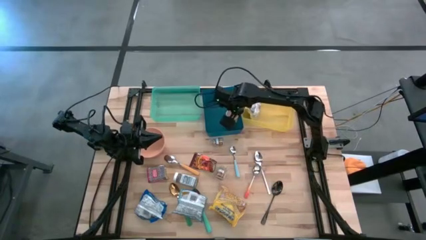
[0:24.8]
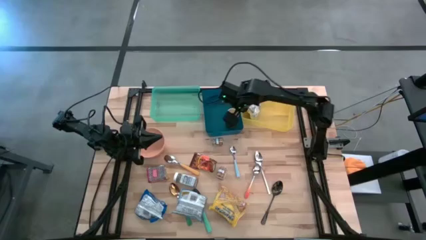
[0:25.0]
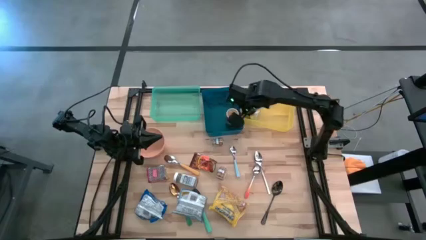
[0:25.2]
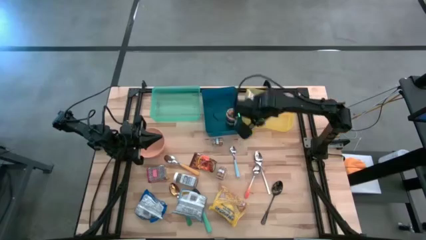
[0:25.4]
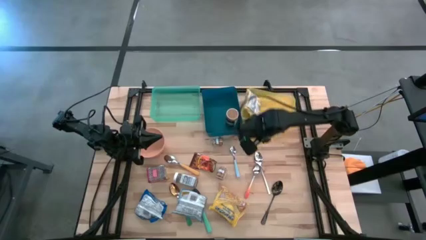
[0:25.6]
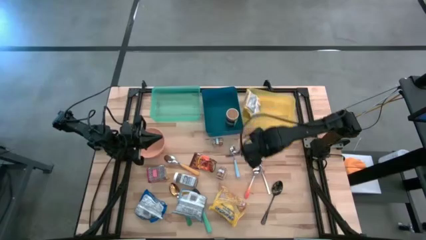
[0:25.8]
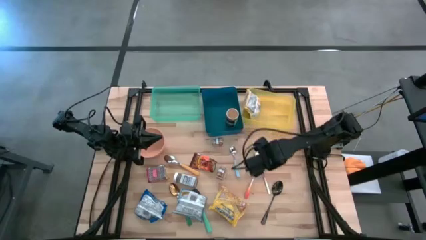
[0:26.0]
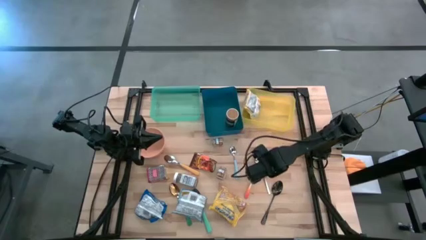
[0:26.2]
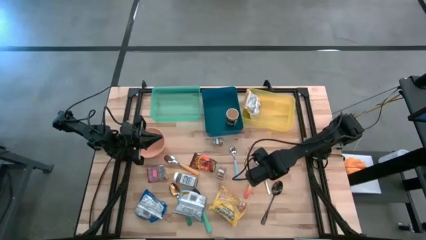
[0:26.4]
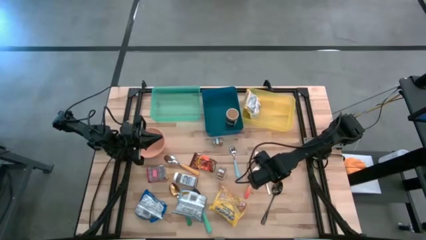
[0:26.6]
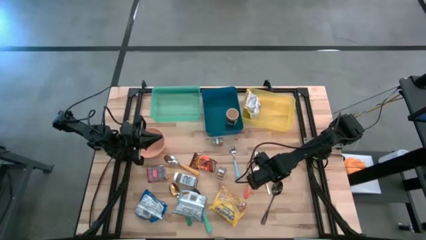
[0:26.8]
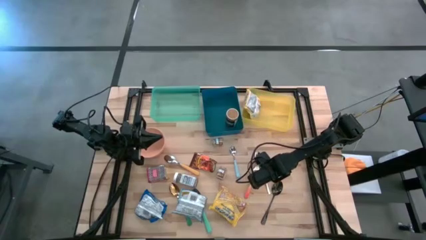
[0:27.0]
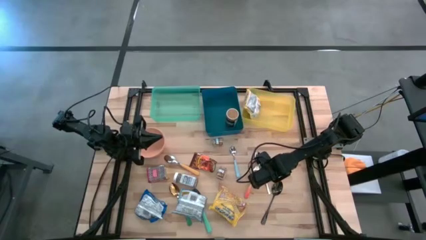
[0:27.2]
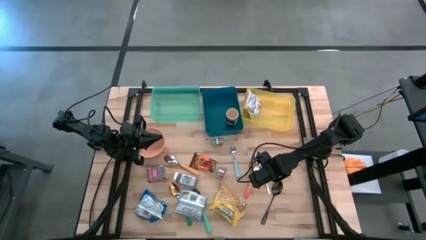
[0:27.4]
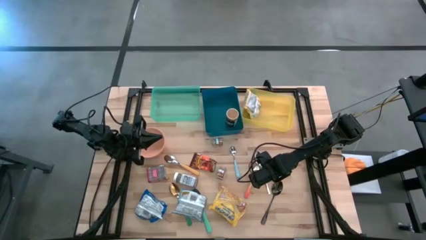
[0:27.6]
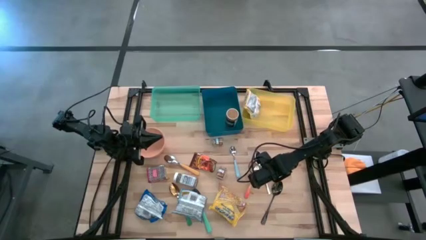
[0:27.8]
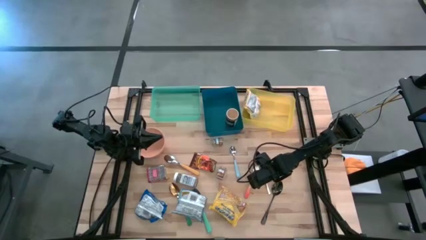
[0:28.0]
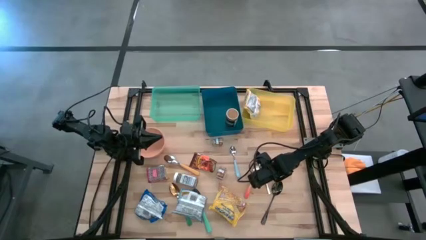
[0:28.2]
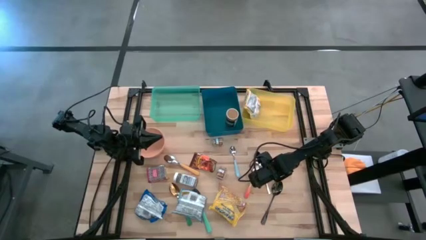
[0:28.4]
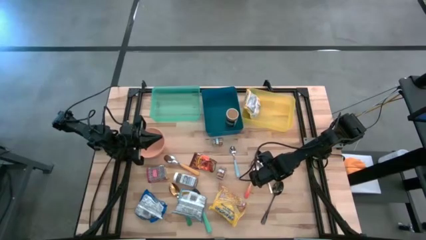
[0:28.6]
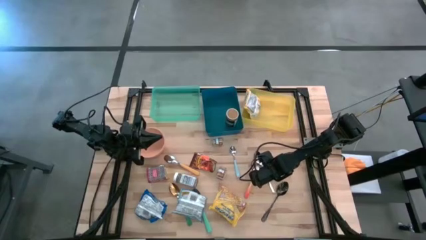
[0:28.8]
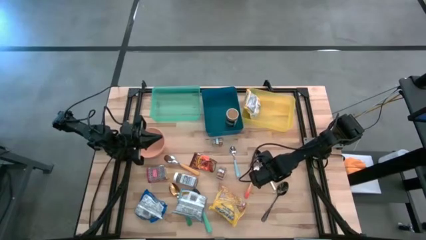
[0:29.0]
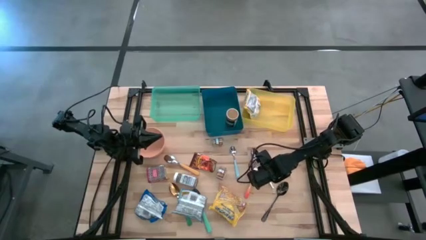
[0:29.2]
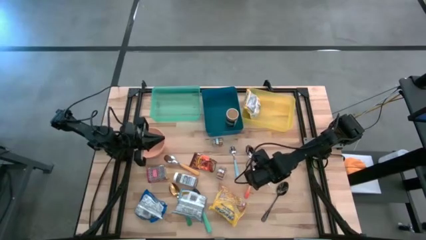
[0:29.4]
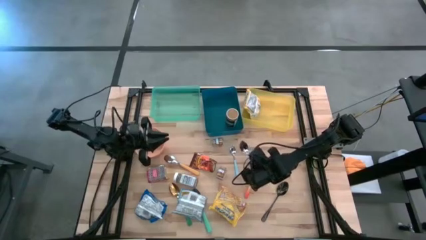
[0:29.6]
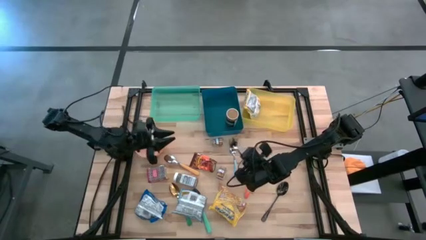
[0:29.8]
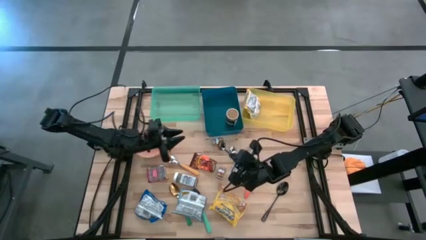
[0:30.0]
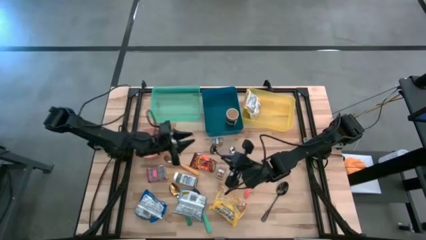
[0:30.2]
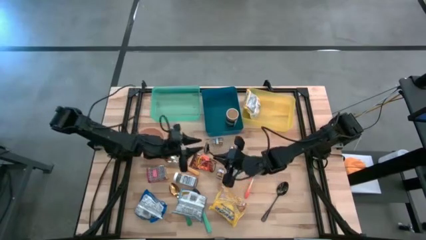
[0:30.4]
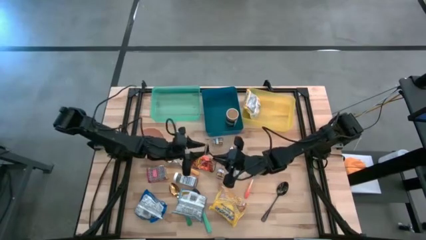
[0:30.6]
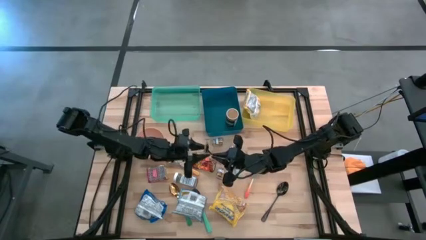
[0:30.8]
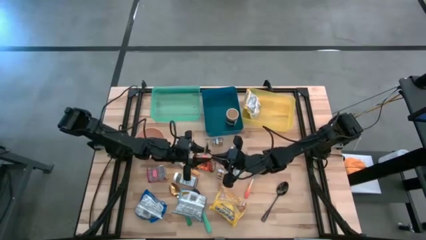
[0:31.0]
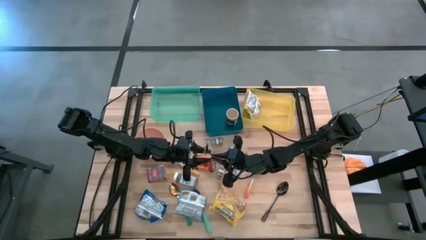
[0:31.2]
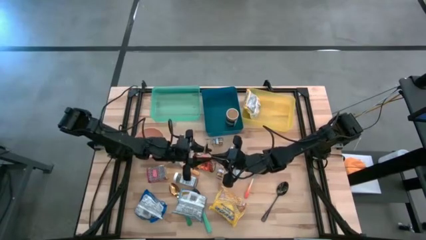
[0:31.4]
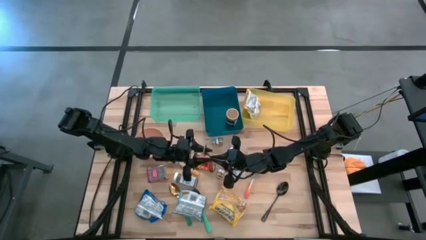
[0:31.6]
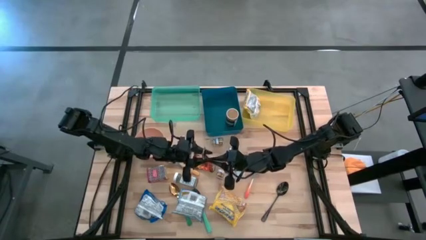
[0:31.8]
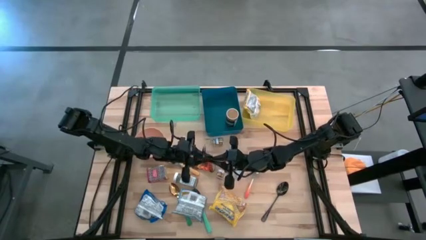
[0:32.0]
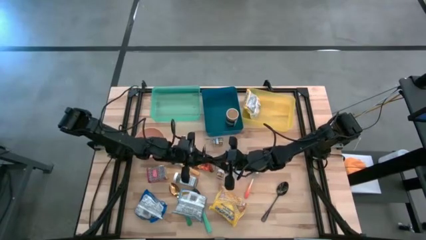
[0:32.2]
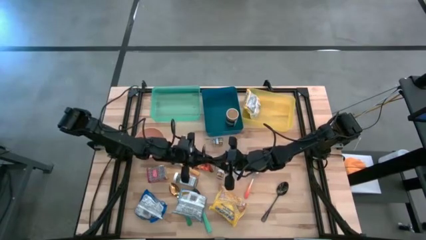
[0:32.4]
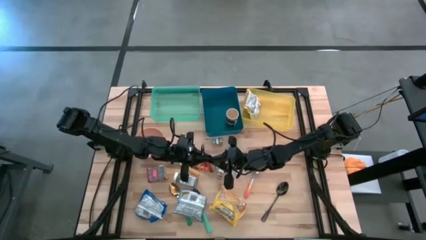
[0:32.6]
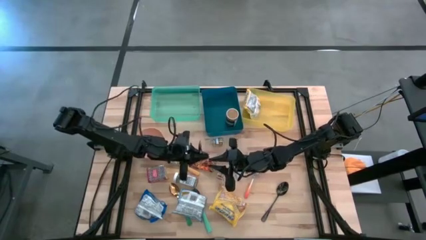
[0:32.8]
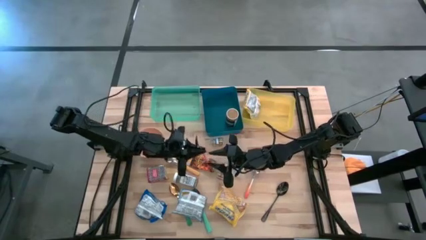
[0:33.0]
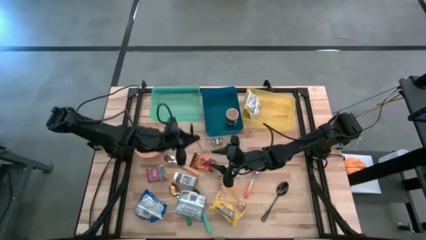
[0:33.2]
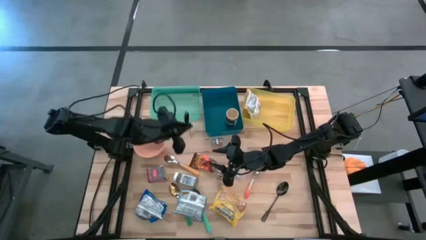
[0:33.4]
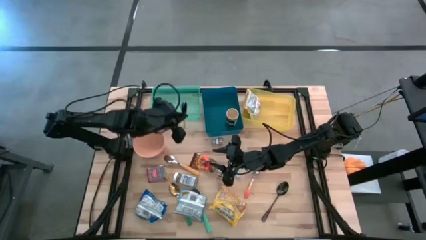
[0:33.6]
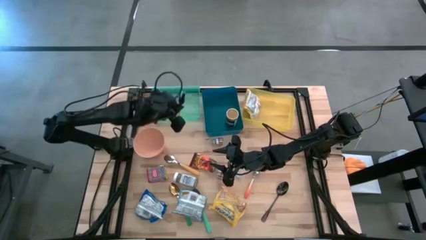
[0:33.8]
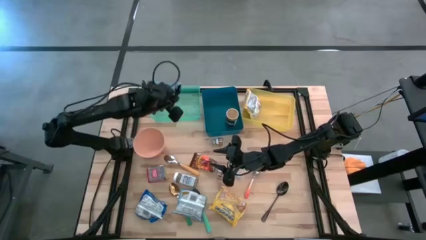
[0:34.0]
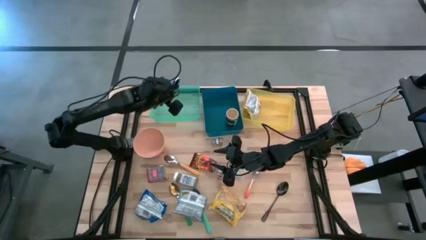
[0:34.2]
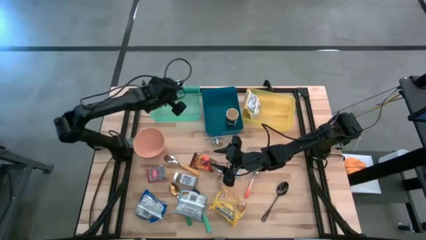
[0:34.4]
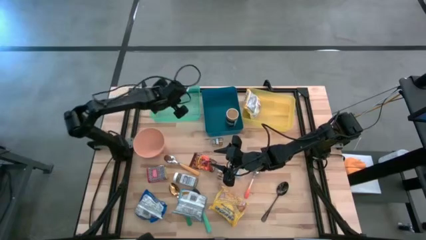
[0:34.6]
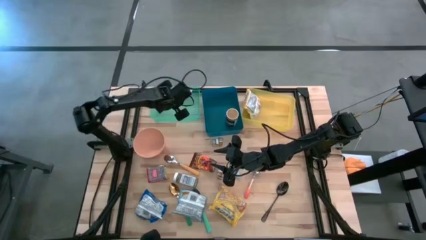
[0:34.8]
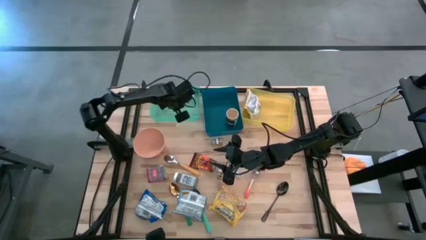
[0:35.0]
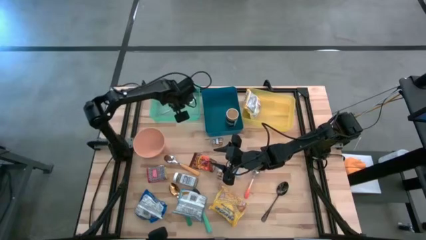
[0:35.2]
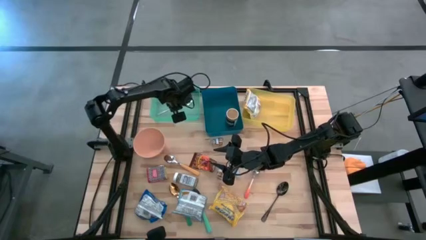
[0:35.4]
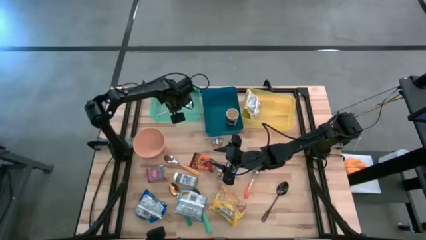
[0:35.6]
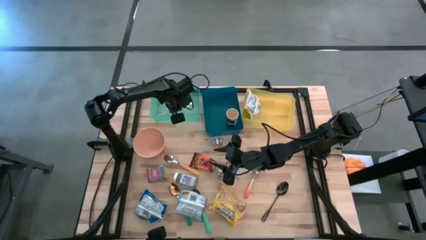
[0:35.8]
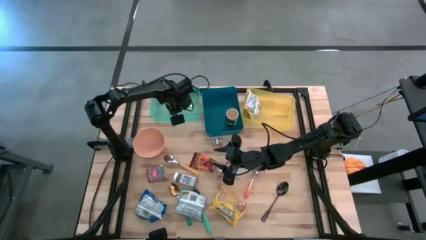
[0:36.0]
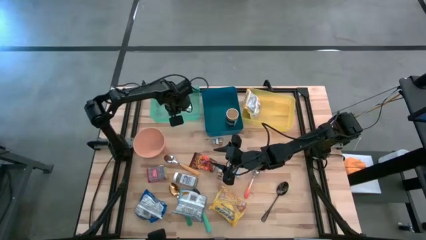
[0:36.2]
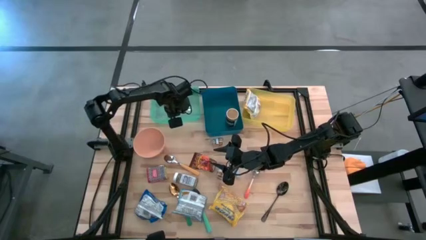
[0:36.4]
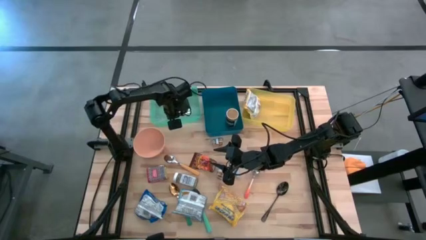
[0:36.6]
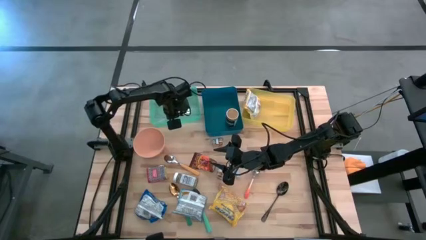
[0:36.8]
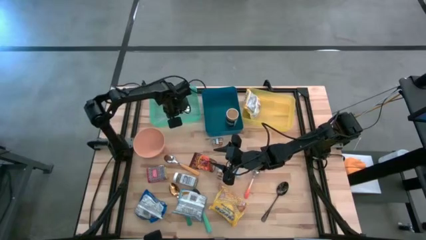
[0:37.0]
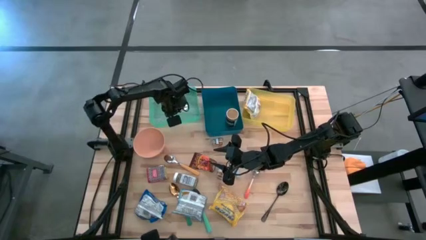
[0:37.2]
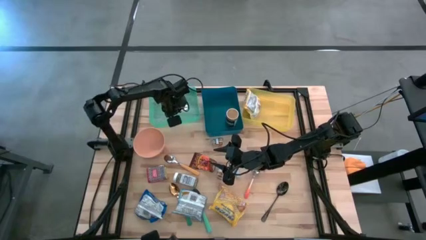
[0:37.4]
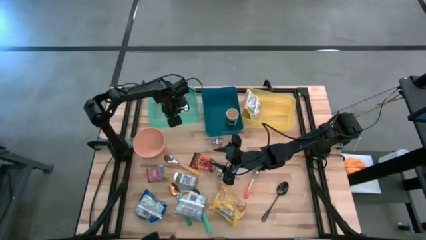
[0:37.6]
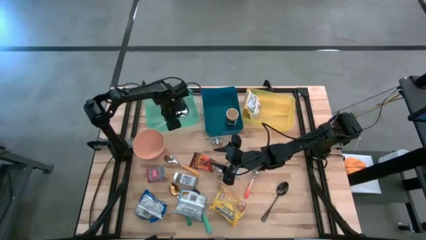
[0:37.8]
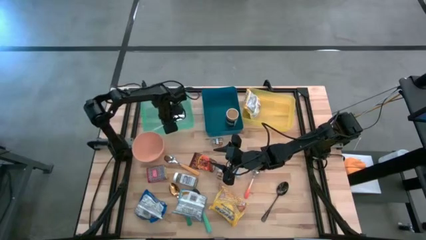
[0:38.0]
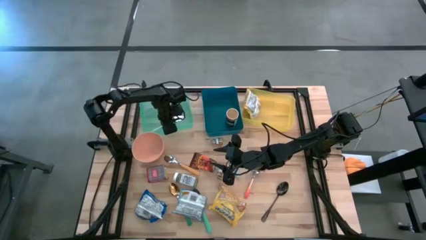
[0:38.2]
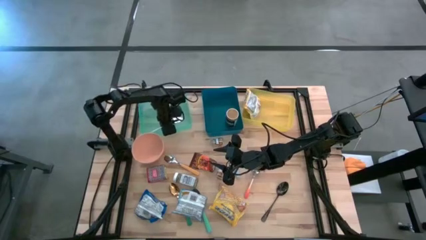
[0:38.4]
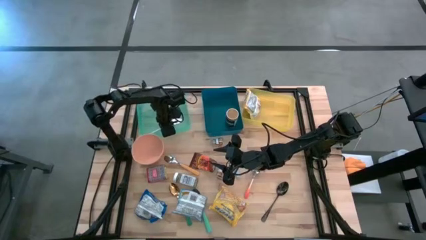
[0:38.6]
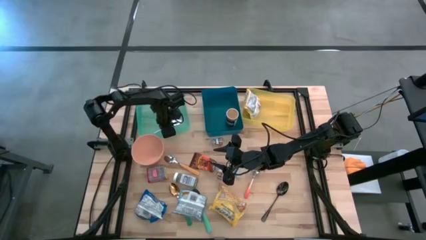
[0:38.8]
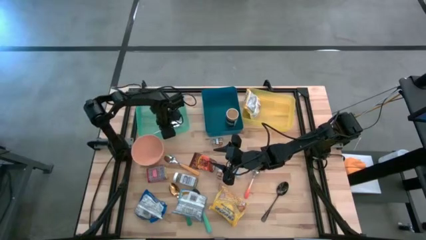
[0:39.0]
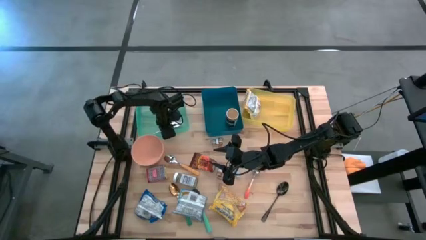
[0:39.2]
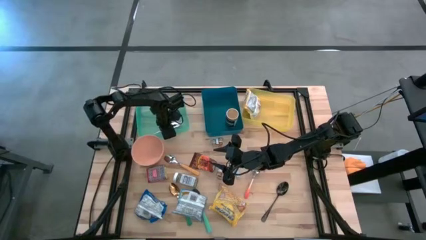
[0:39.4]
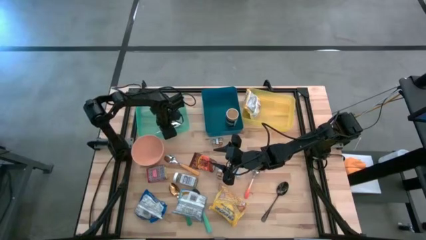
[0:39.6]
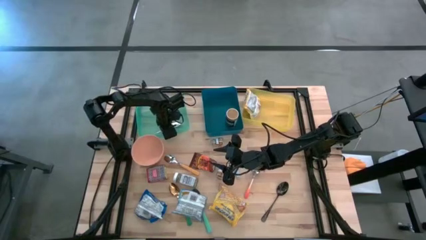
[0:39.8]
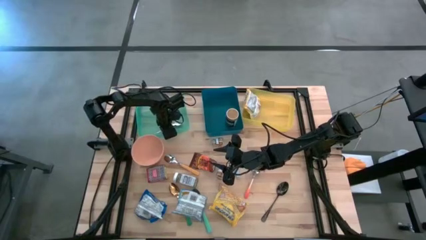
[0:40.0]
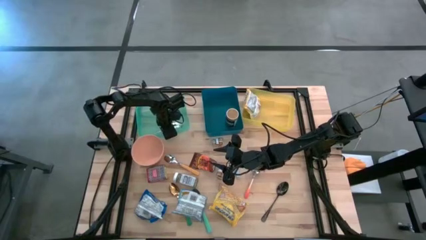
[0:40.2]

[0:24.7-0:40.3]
Put the silver spoon into the green bin
